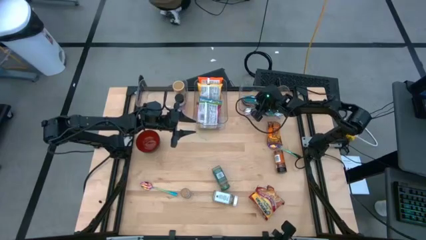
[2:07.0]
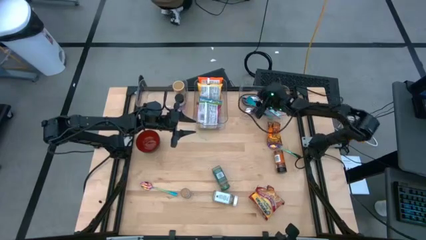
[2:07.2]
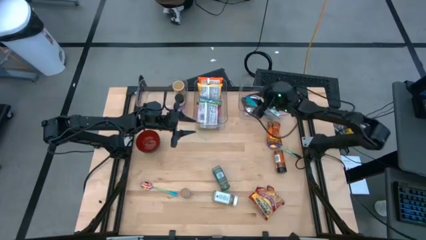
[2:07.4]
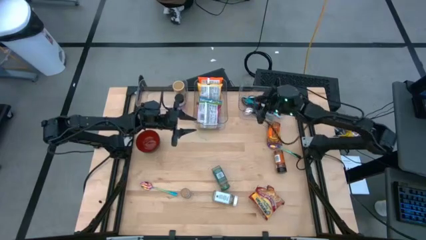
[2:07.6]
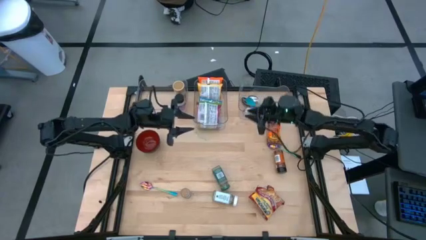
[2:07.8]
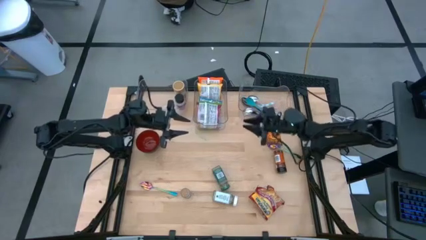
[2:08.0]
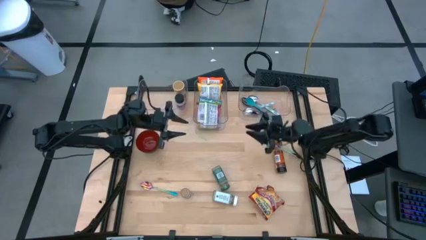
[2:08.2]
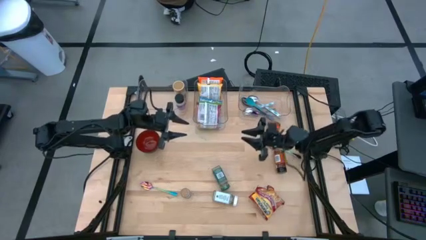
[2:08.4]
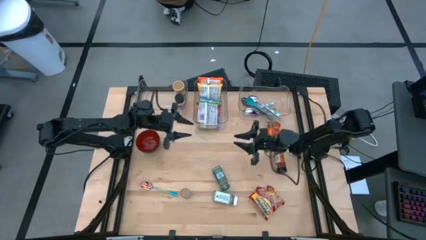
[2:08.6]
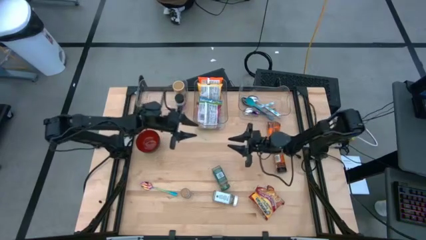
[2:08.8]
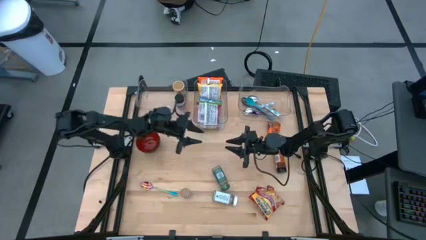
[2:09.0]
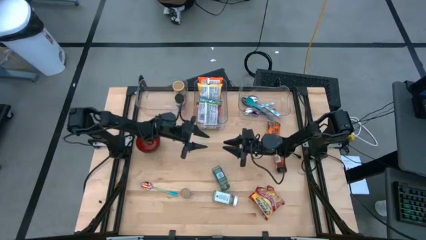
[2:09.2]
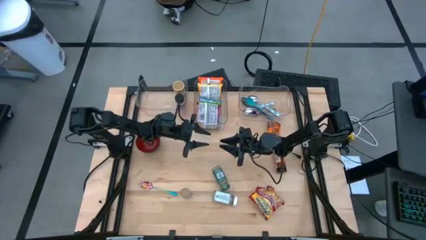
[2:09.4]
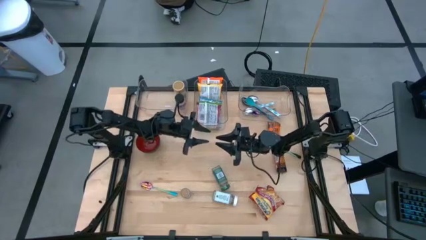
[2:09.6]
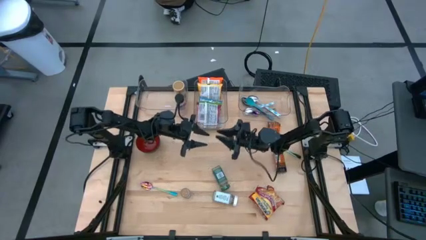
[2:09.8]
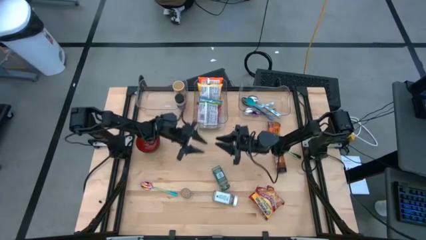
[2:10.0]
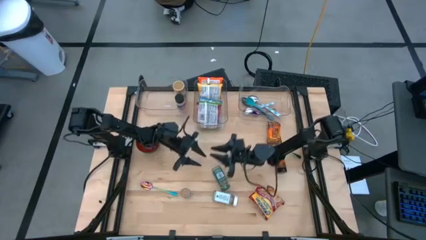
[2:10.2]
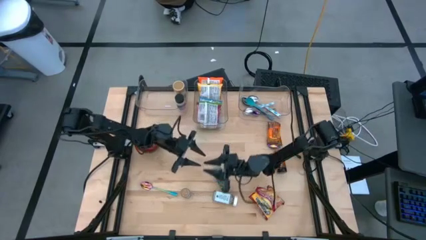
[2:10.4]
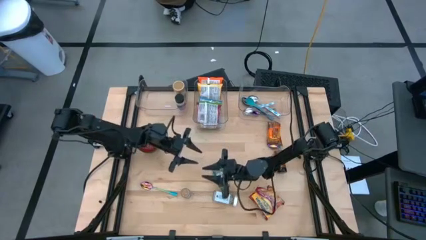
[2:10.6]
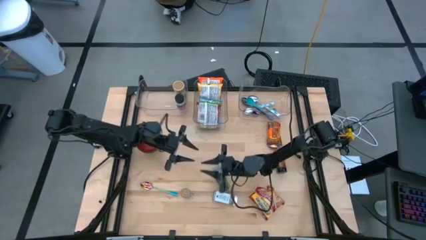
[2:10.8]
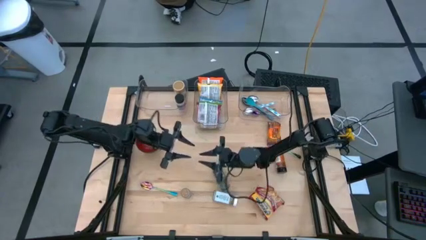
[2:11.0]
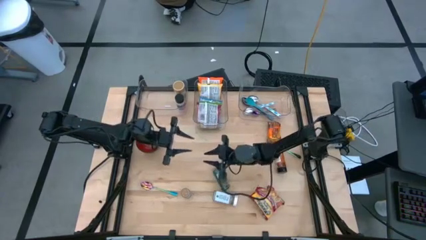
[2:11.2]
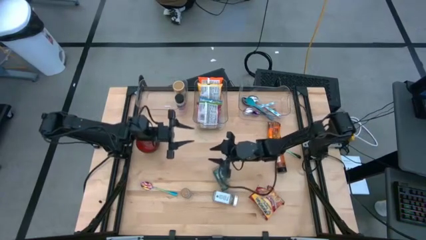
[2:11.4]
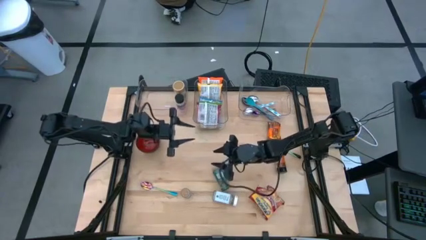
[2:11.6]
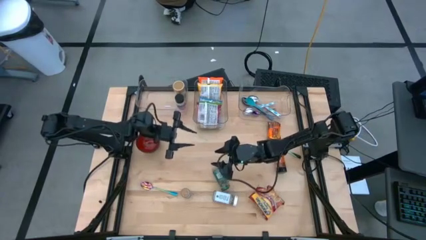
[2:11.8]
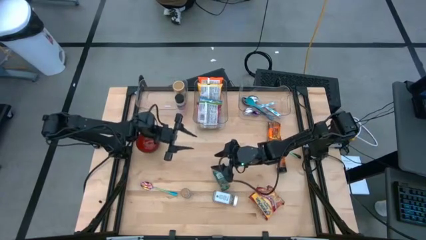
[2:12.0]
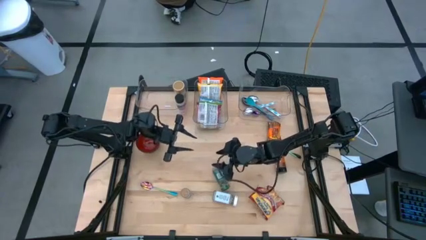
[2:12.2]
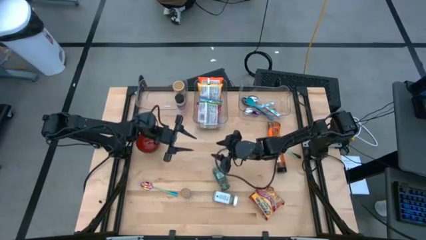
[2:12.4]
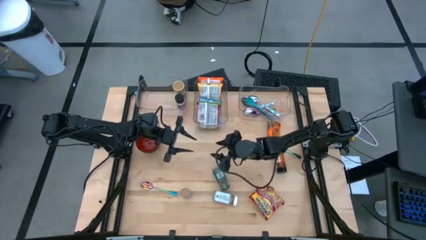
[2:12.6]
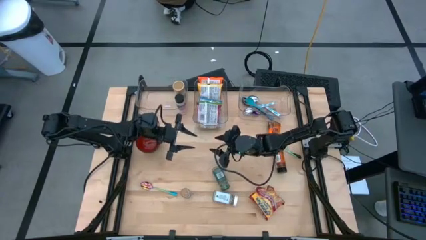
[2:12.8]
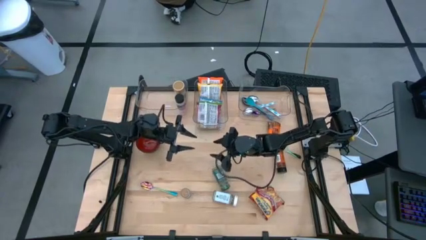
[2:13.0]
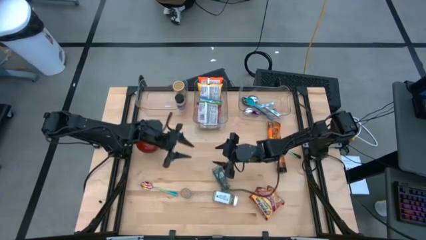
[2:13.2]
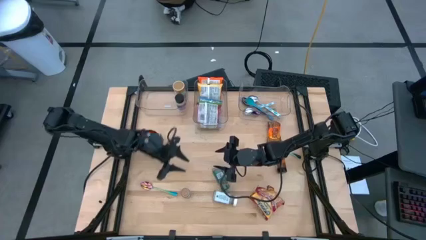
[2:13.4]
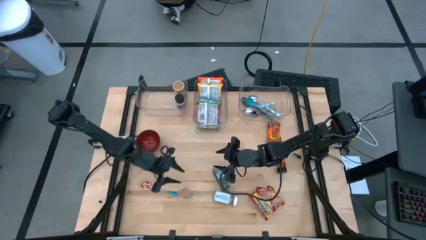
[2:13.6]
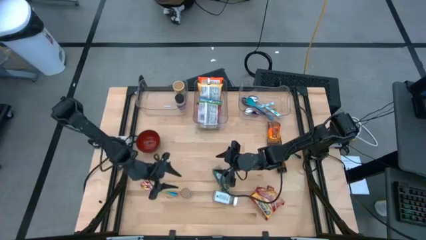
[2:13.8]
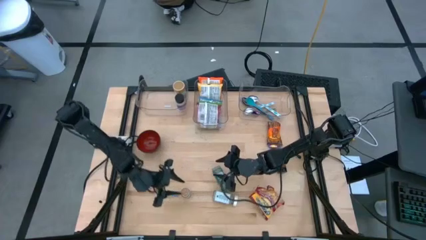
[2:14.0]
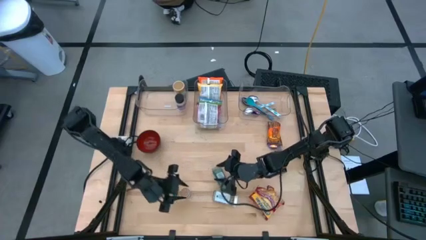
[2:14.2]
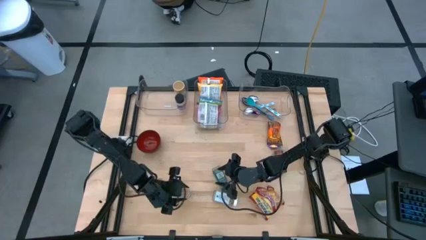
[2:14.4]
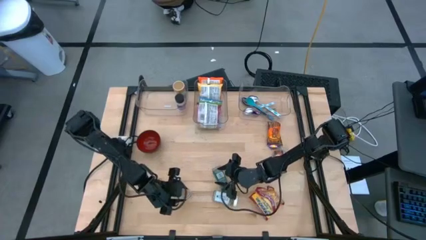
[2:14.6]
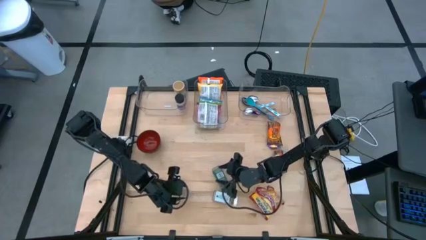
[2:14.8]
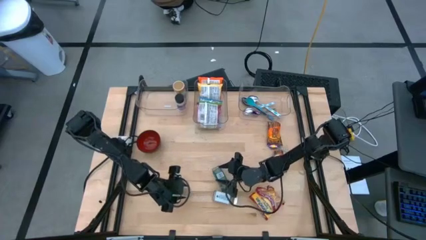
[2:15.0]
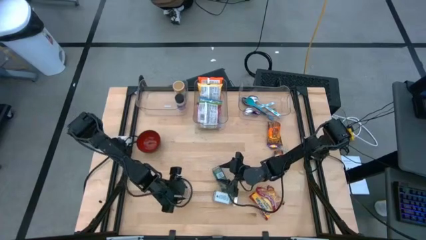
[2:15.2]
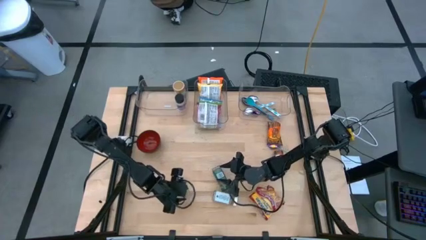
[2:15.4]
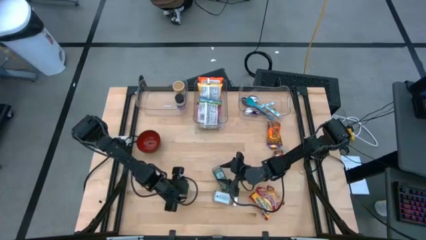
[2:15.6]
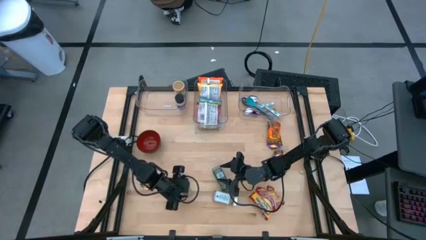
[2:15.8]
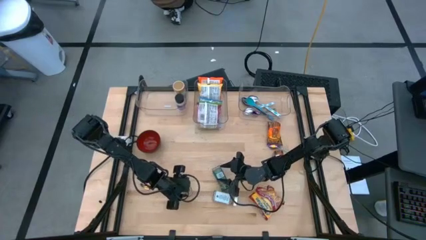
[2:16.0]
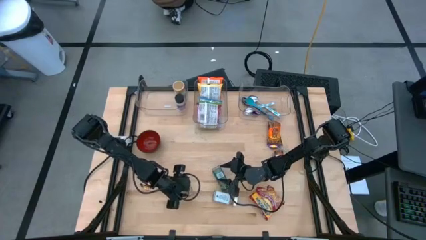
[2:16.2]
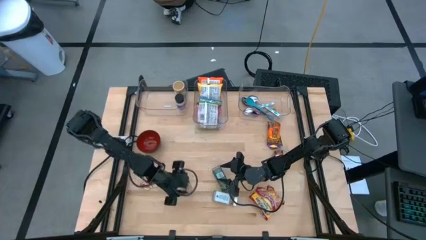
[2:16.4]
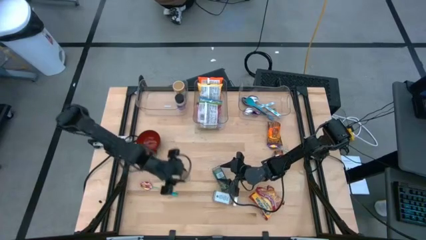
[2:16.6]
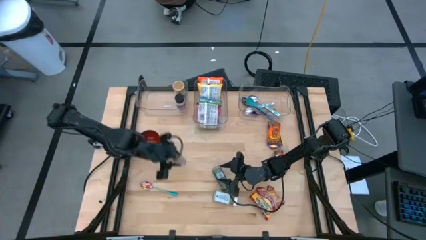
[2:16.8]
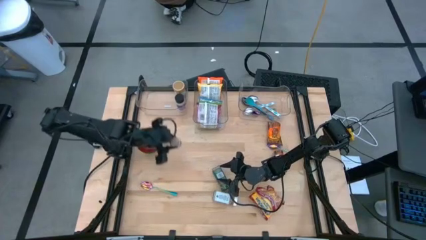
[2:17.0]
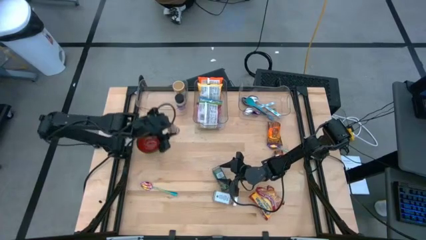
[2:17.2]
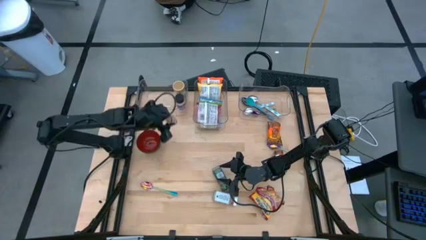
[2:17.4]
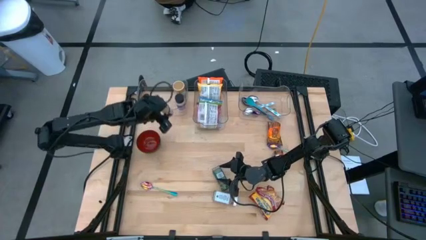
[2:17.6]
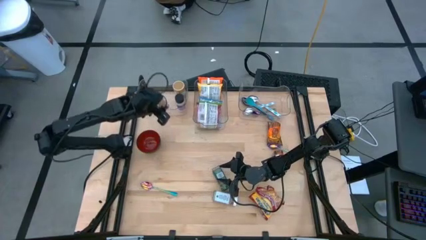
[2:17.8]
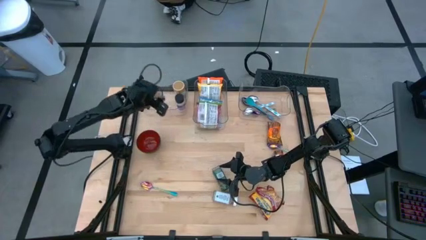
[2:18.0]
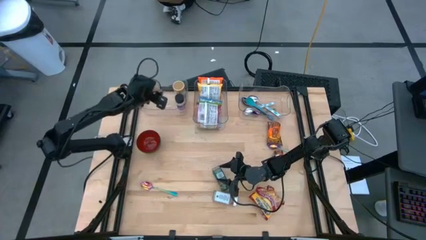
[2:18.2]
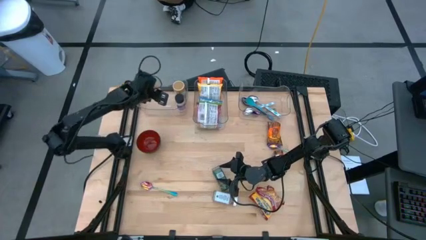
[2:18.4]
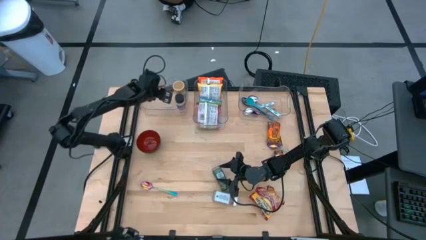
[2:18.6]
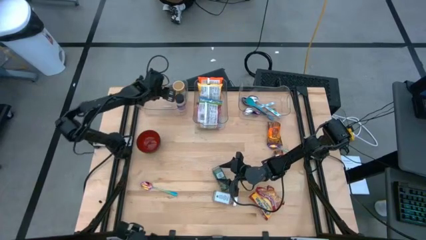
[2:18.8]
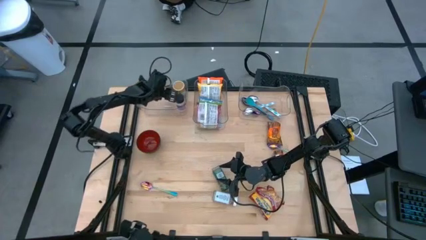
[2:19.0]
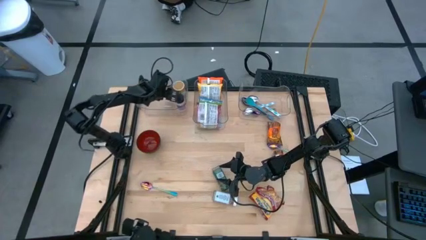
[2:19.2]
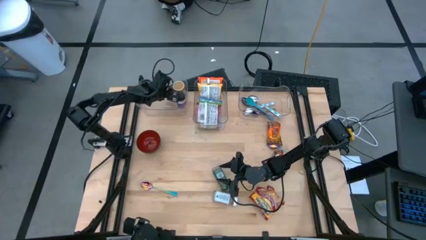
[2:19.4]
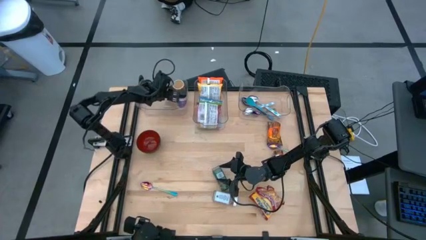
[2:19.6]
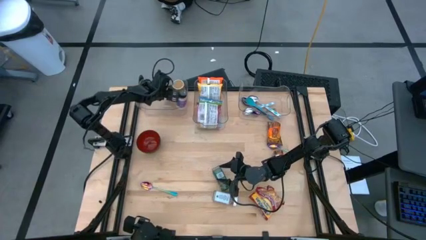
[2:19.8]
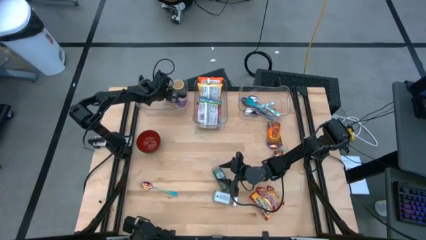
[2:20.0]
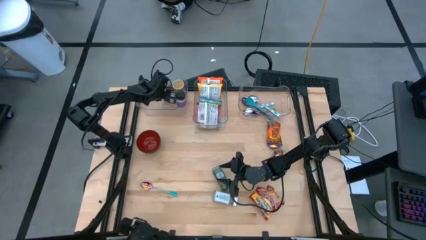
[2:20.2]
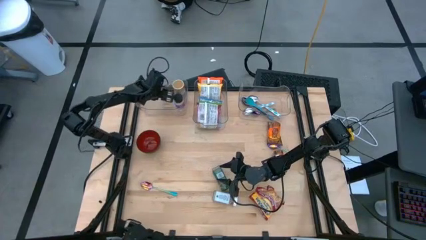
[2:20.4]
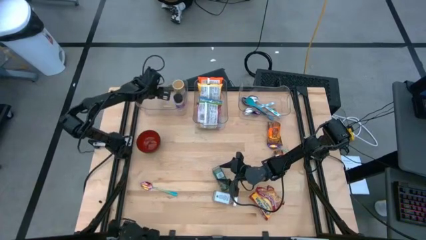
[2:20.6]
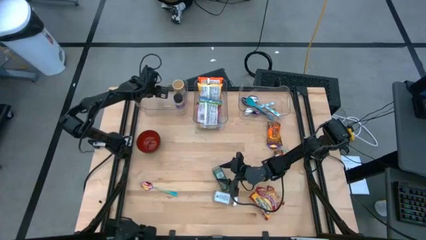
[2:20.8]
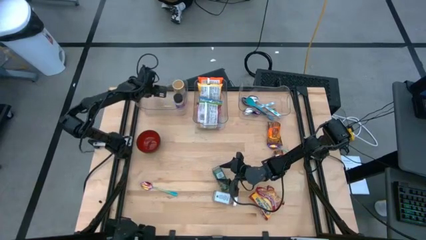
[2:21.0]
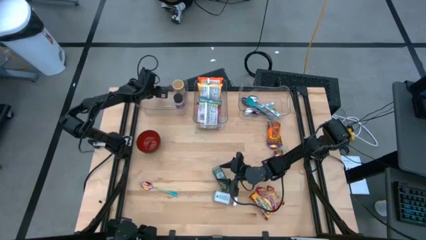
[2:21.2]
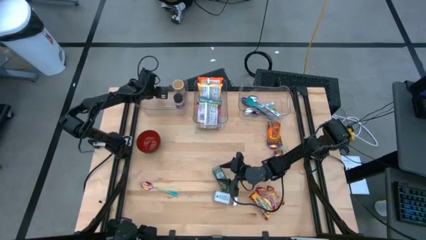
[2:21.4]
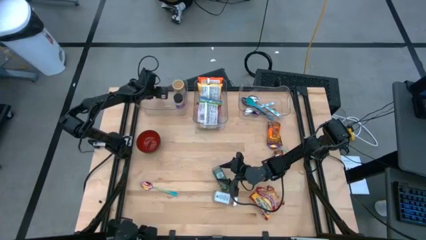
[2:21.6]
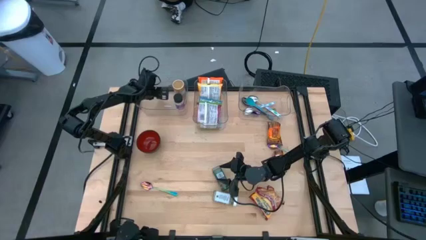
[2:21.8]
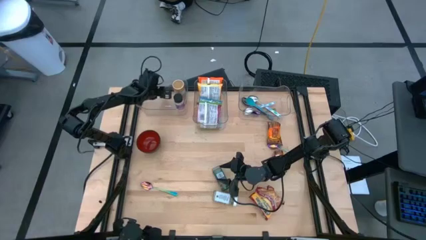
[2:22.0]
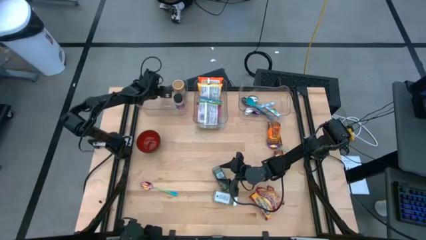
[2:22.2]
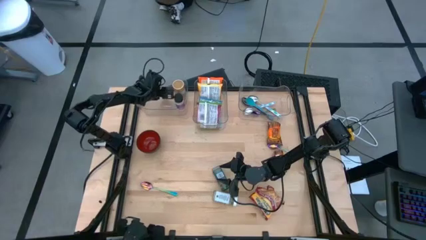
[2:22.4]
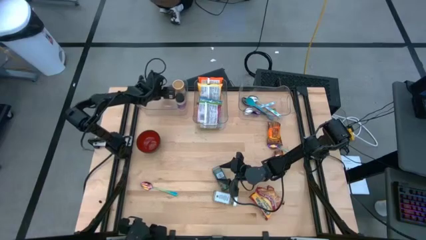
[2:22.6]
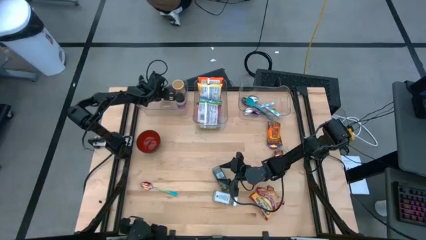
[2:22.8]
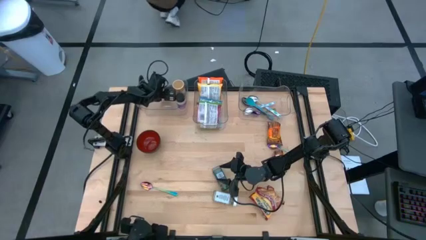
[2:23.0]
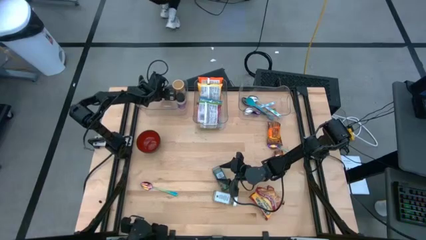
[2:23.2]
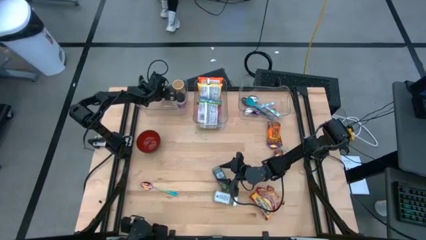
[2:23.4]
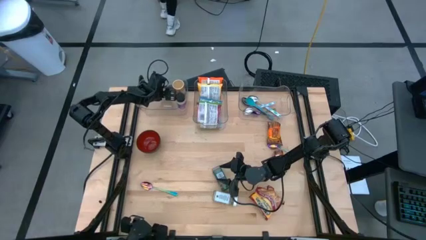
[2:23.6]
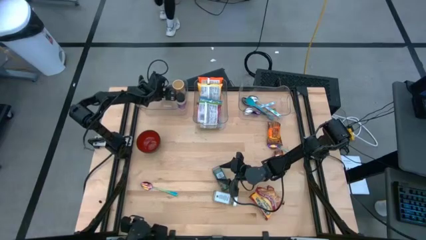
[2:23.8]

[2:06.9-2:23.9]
Task: Pick & Place Food Item
Put the brown seasoning bottle into the left transparent bin

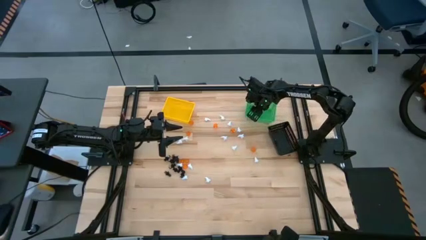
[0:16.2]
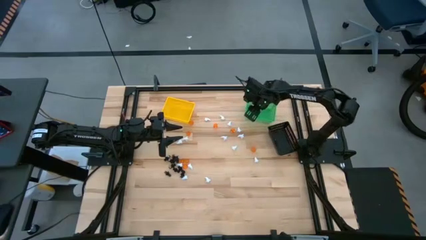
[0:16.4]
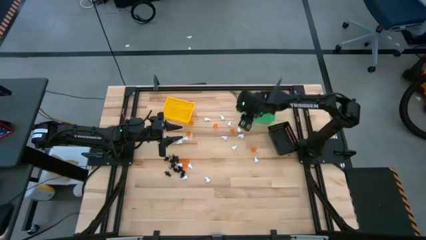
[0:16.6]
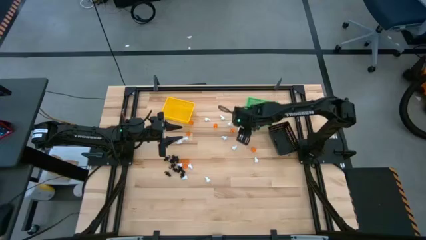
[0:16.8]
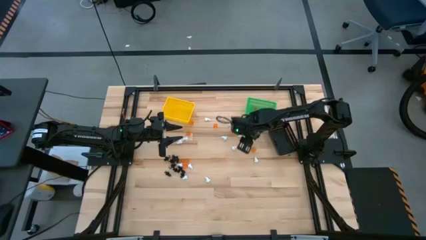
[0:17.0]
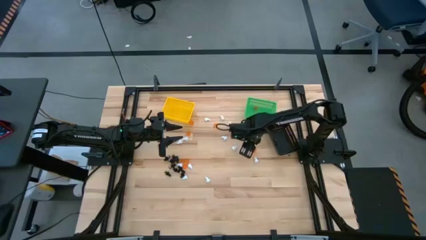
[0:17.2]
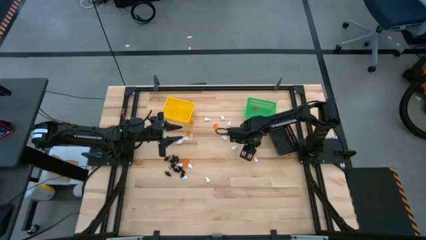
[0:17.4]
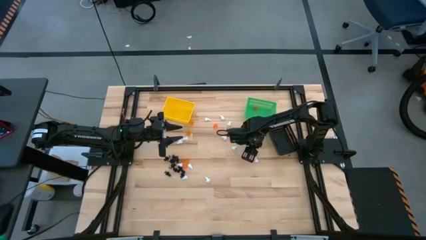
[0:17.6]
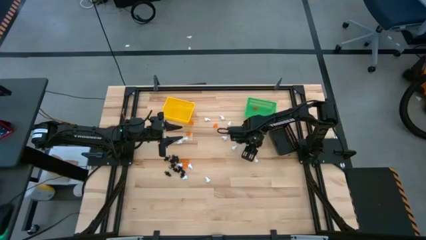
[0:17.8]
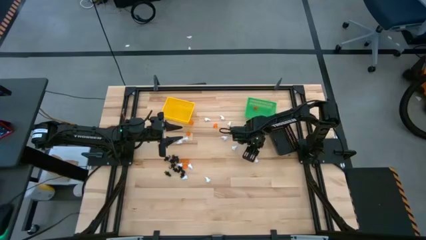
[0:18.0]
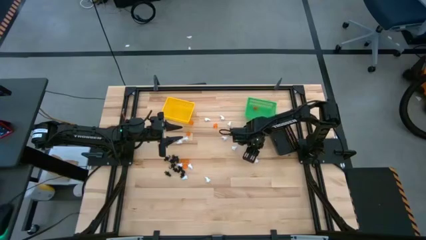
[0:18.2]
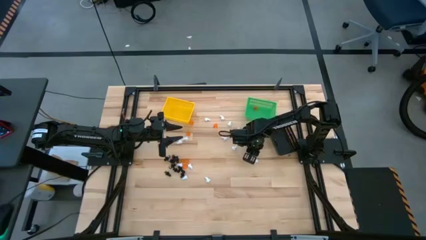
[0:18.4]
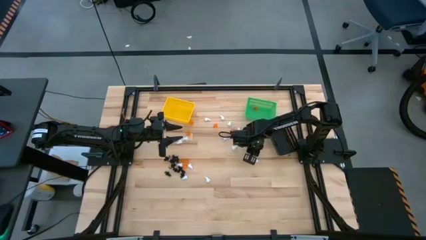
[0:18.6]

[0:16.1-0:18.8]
Task: Sort Halloween decoration
Put the orange pumpkin toy into the green bin
